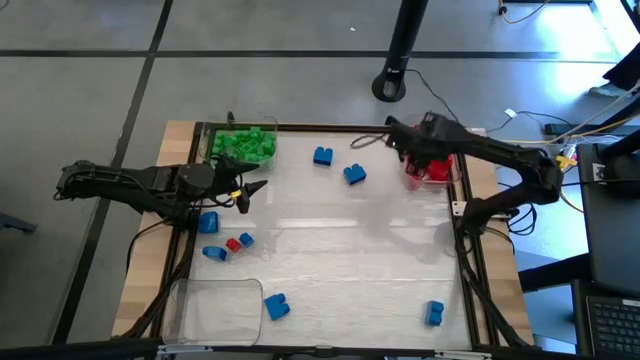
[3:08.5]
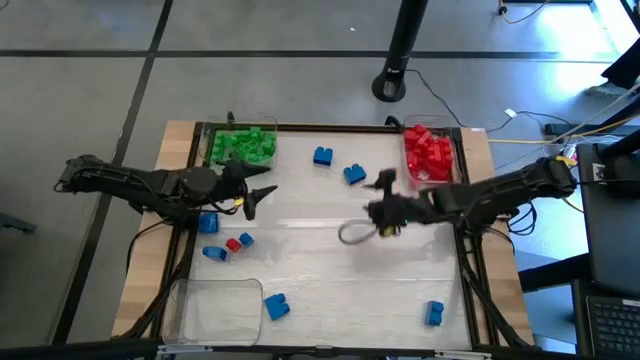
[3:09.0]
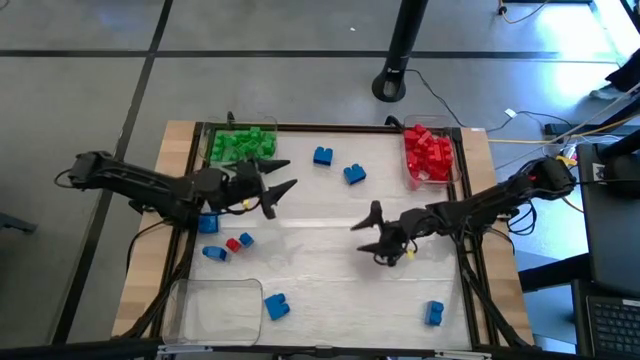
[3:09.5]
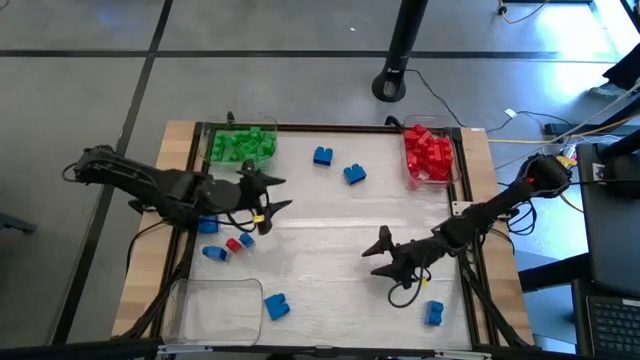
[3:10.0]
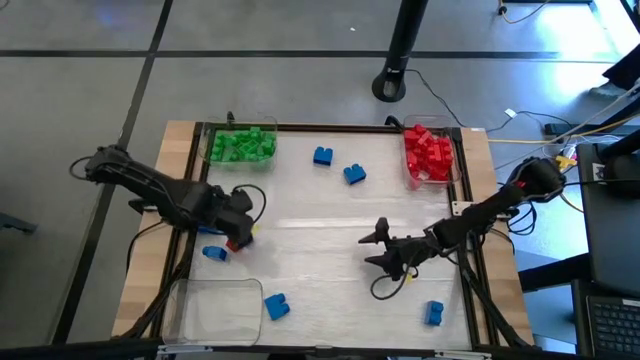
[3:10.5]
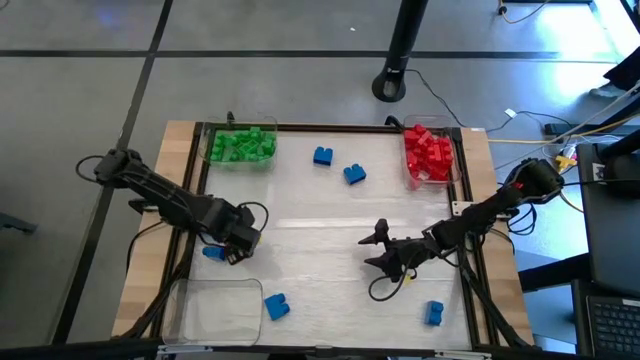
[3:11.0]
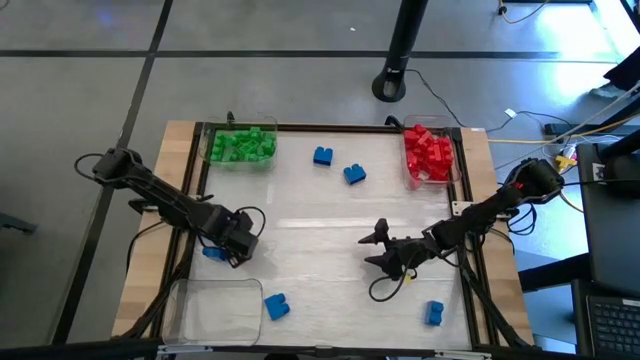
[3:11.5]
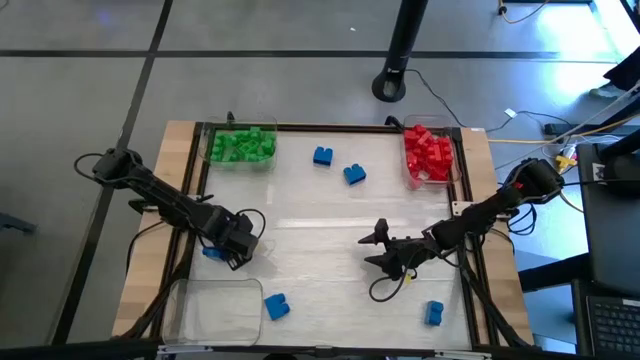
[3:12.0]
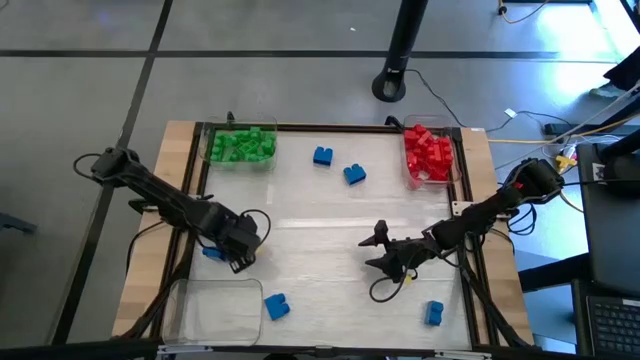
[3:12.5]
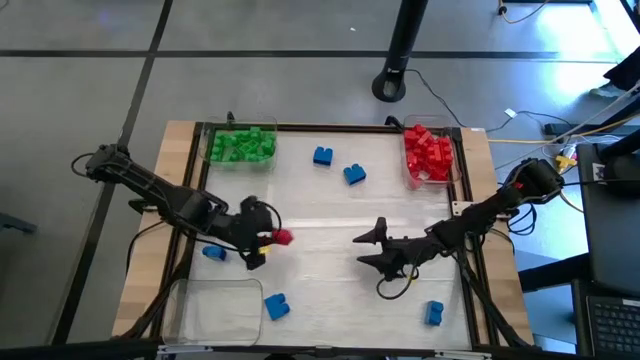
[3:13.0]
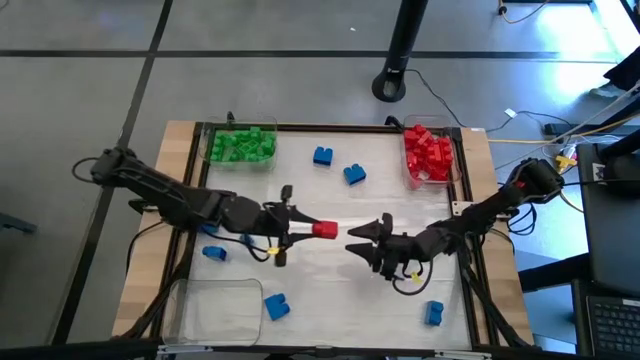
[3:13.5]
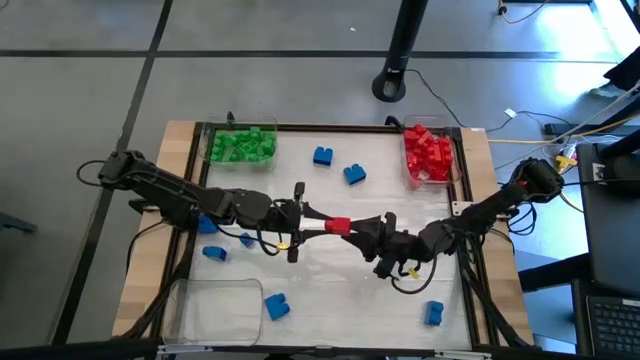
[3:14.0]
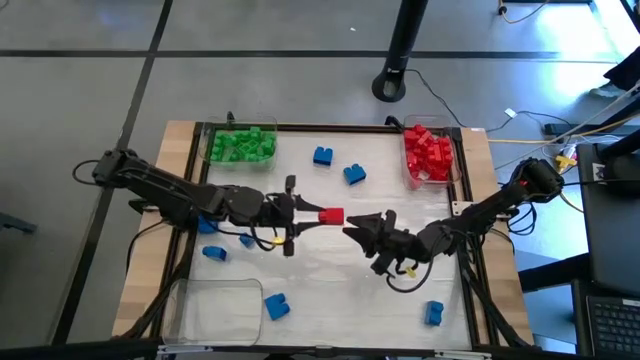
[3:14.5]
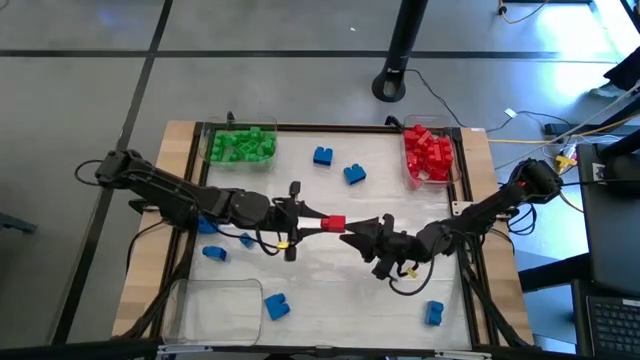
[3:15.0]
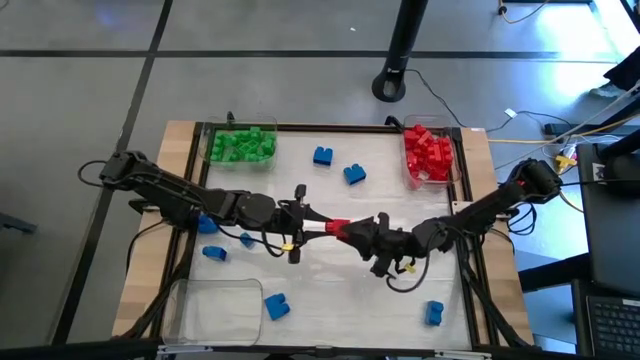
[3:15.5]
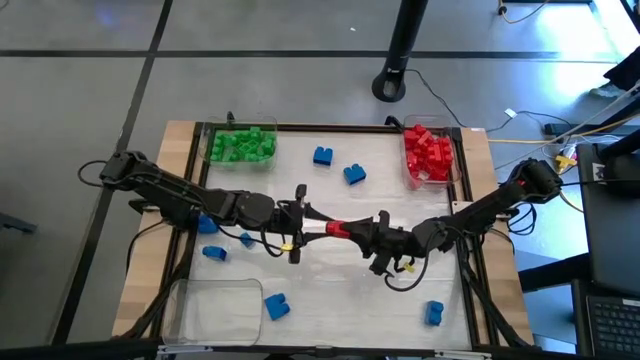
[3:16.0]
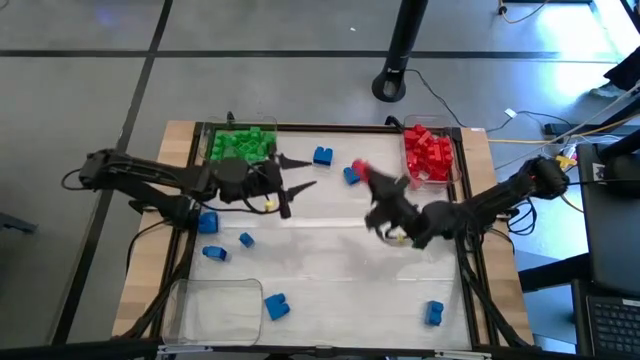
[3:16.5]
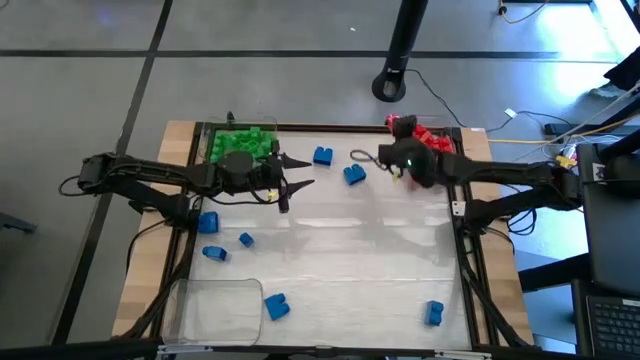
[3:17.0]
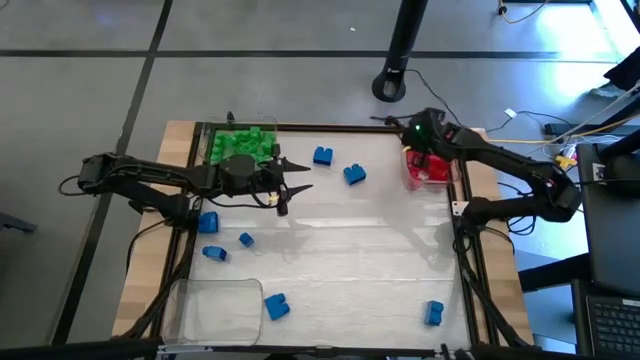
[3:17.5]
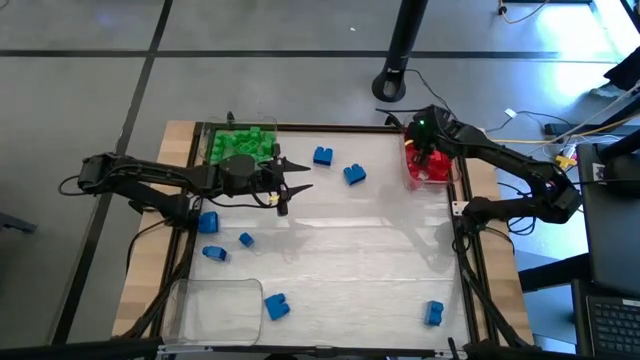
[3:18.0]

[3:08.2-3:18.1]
Task: Sort blocks
Put the red game piece into the right transparent bin

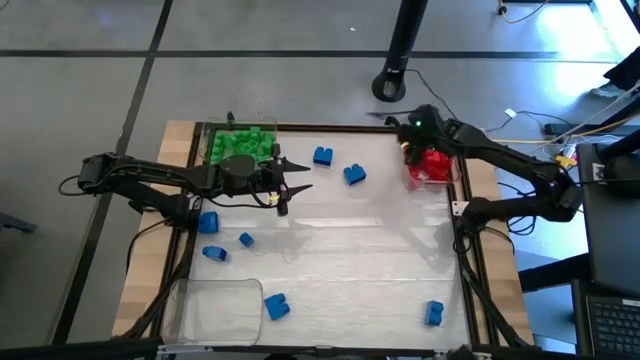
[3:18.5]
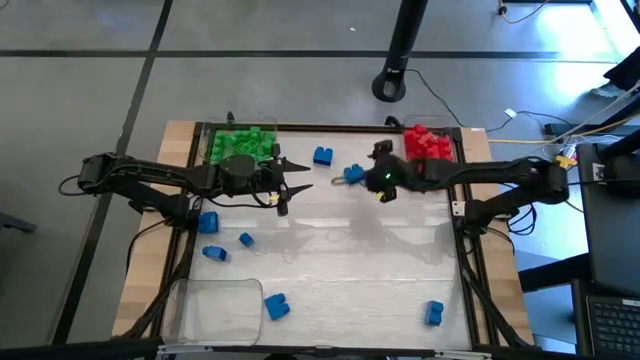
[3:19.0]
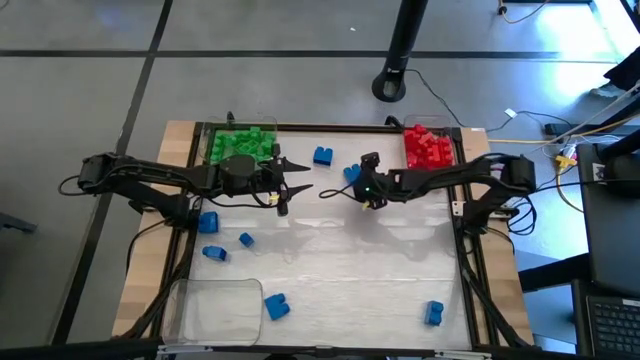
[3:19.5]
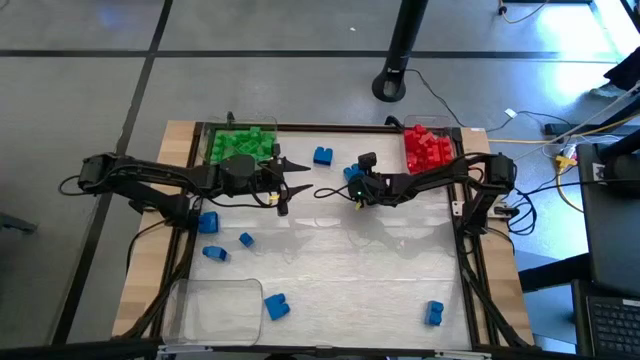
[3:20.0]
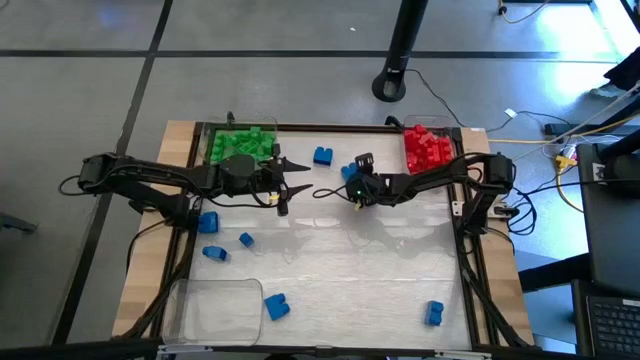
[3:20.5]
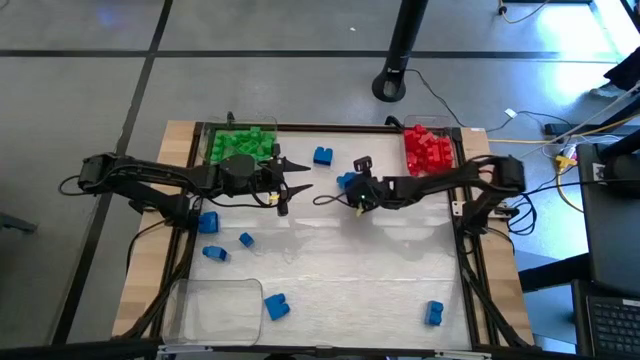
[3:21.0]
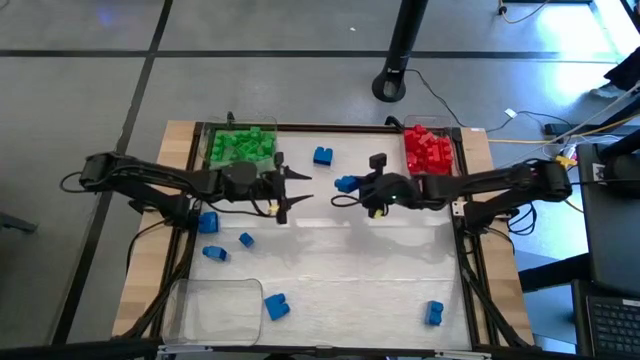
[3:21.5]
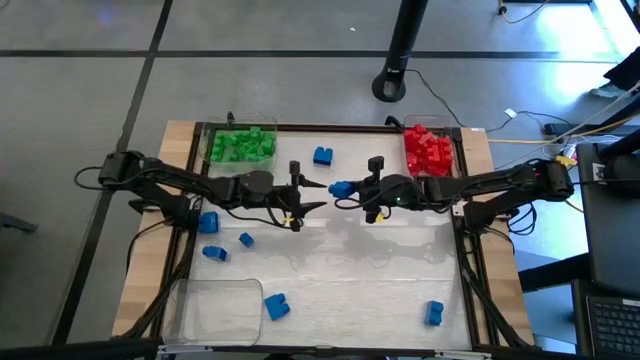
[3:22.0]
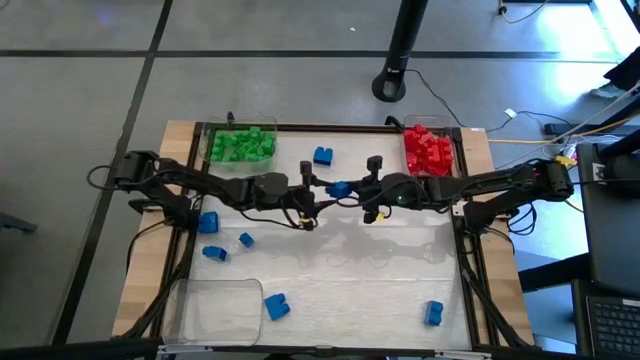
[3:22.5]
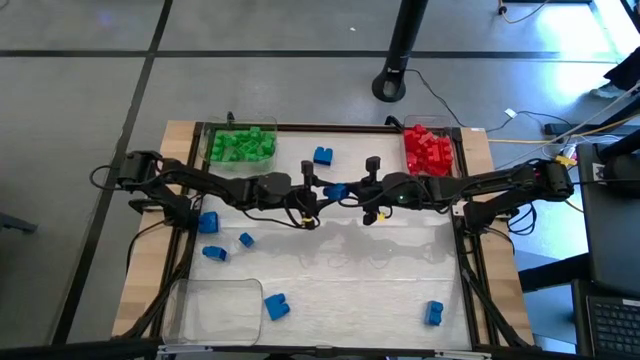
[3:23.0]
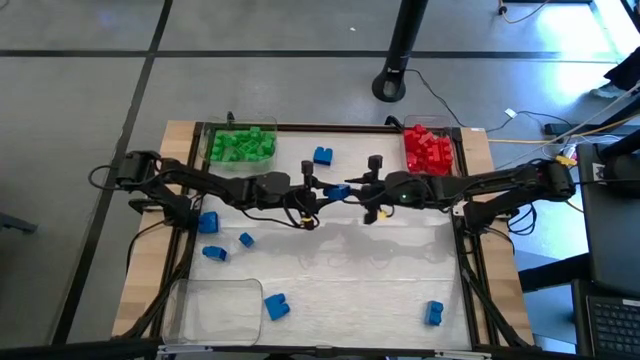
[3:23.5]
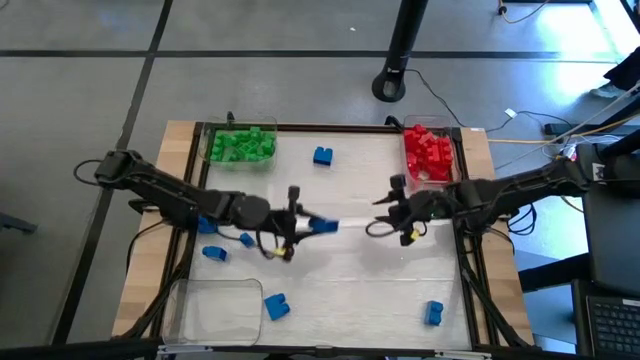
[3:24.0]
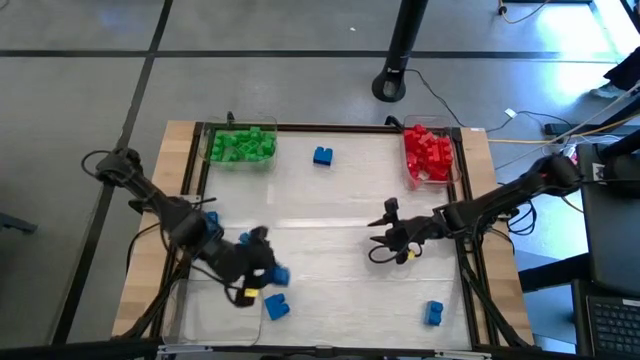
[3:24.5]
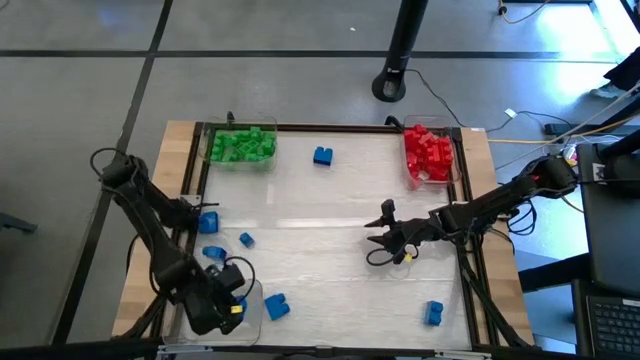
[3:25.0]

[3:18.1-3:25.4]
Put the blue game piece into the bottom transparent bin

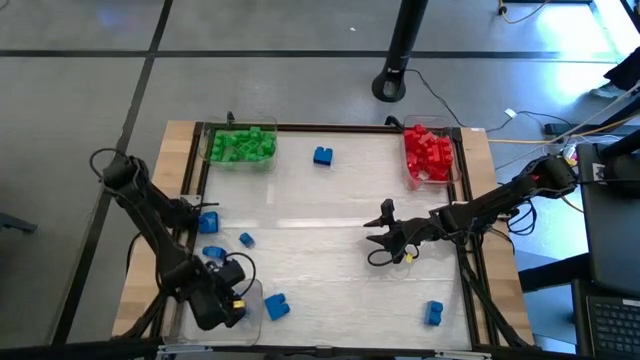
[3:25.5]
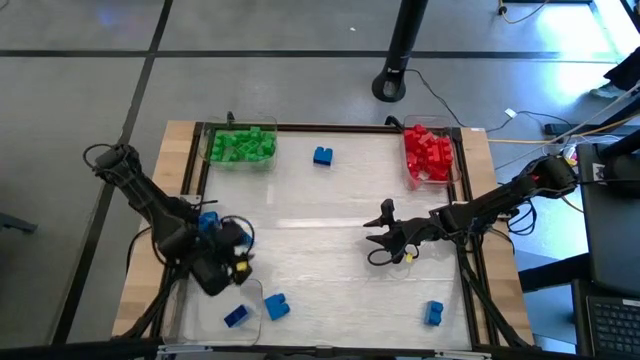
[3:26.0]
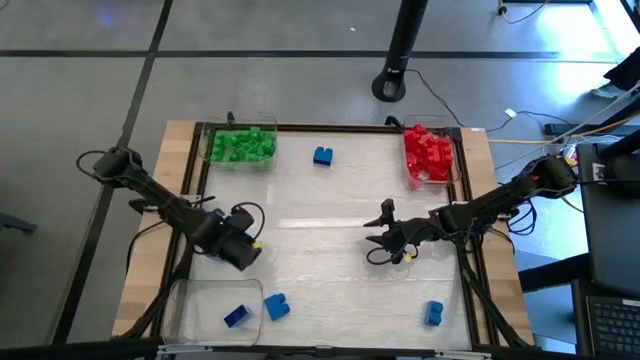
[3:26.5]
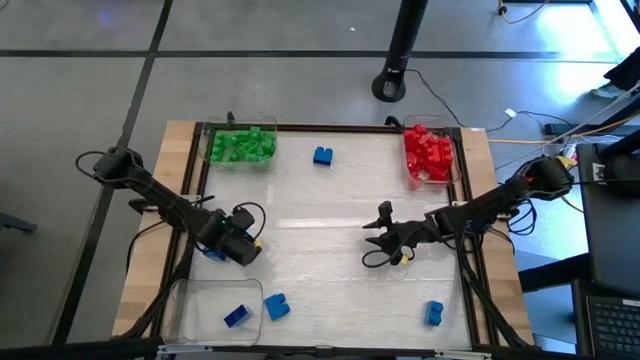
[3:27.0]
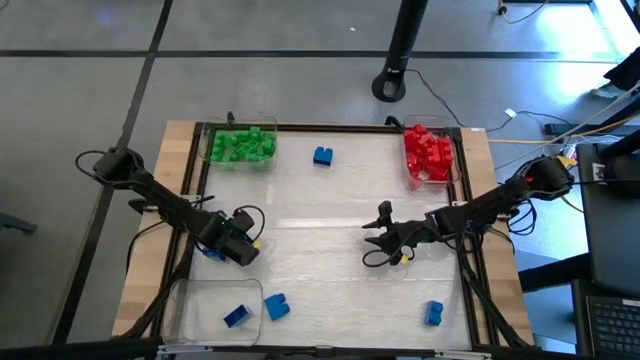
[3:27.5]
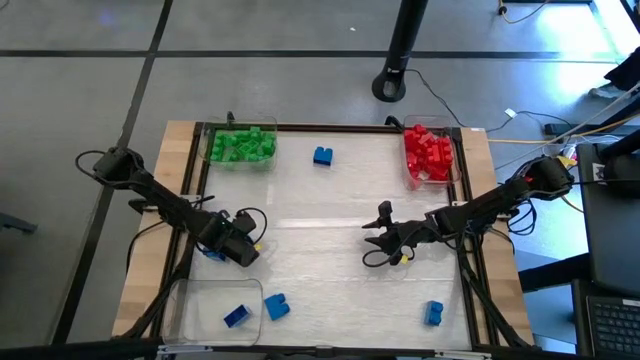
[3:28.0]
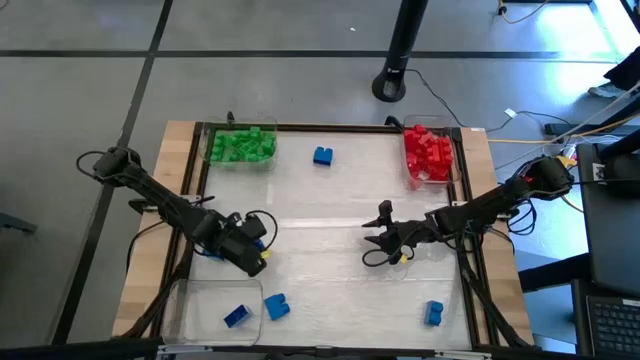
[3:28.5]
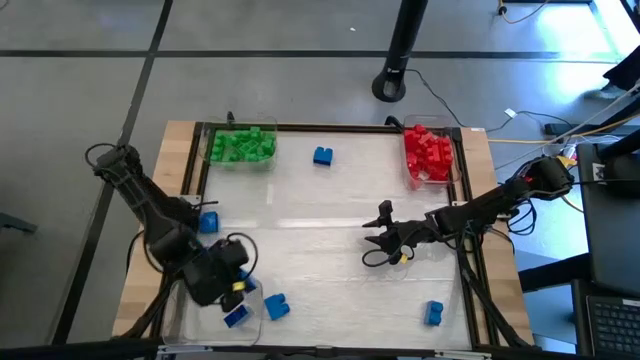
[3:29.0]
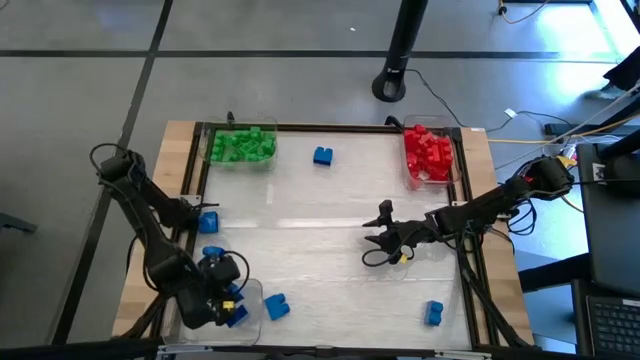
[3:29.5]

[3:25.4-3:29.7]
Put the blue game piece into the bottom transparent bin
